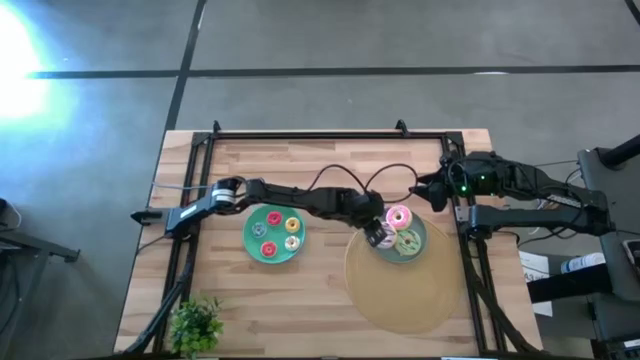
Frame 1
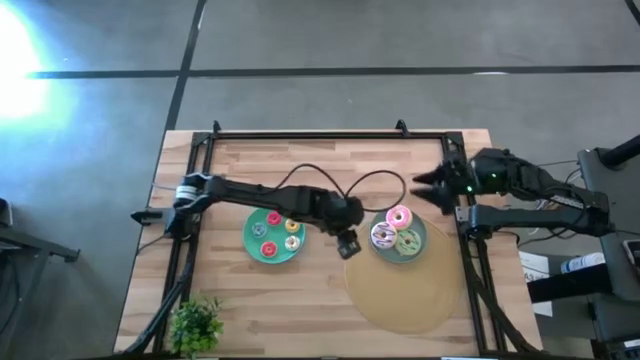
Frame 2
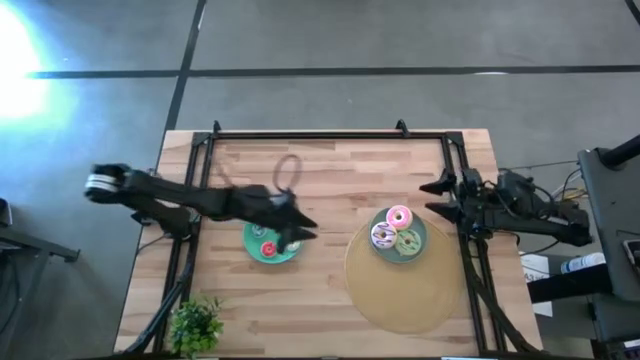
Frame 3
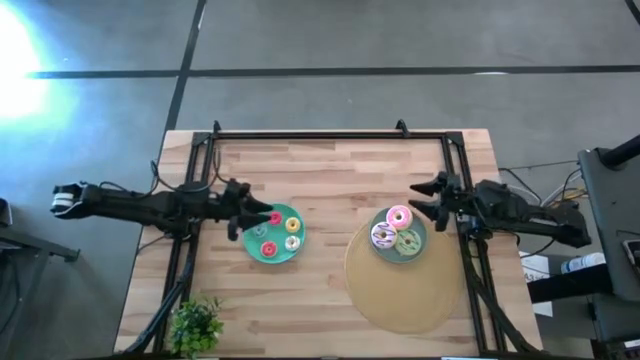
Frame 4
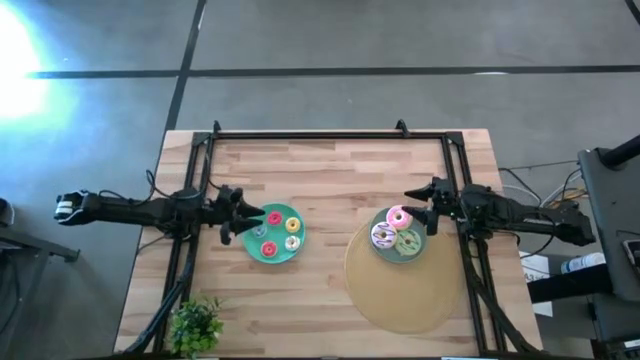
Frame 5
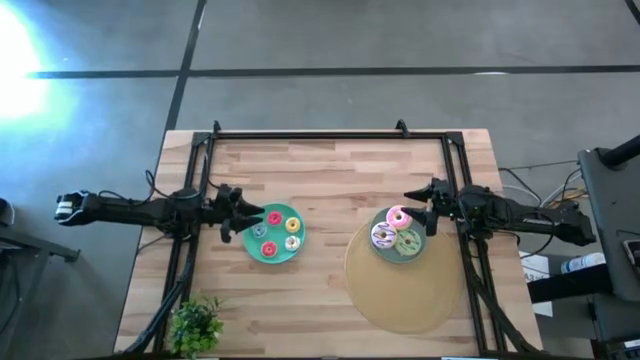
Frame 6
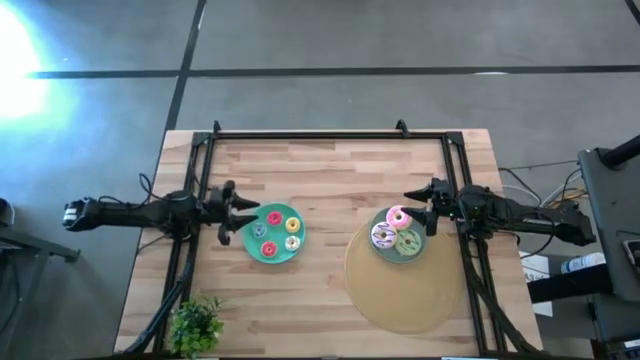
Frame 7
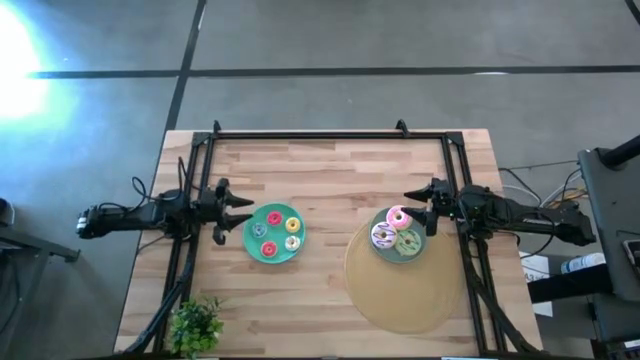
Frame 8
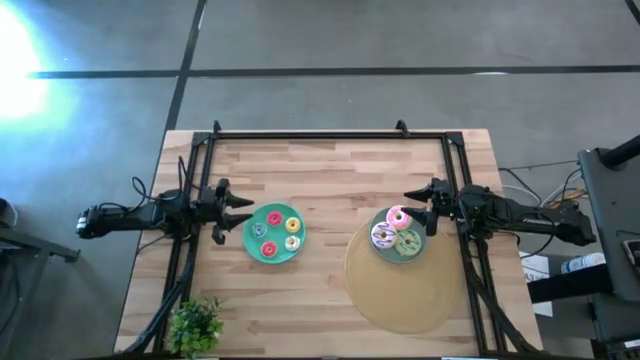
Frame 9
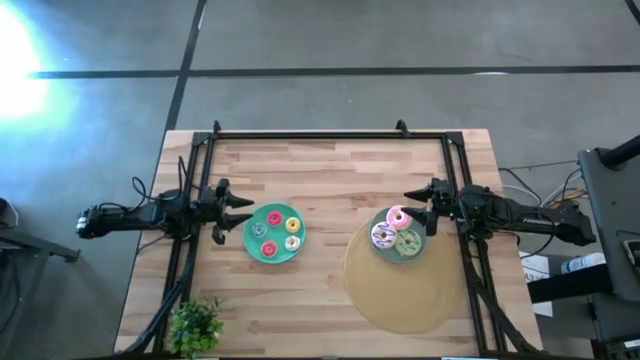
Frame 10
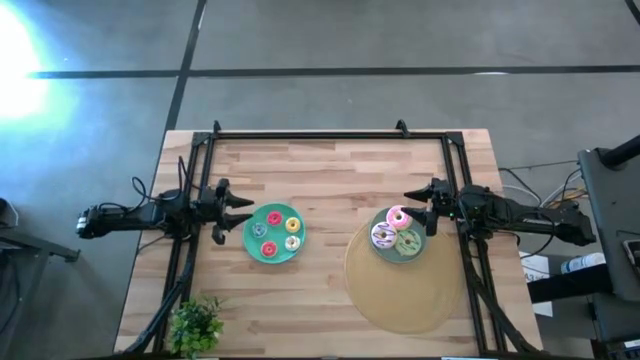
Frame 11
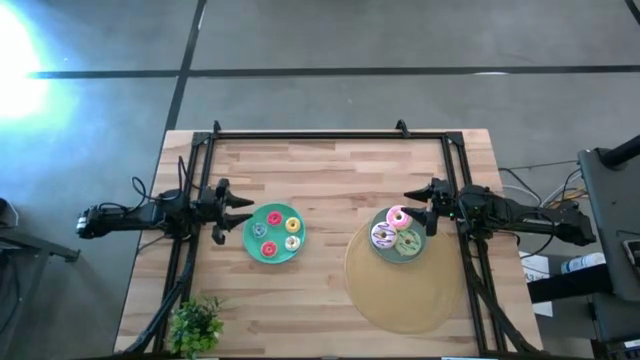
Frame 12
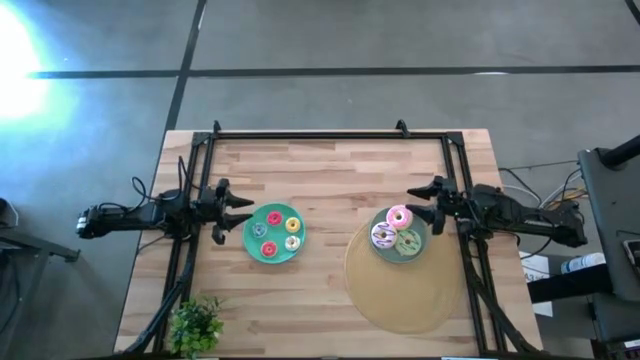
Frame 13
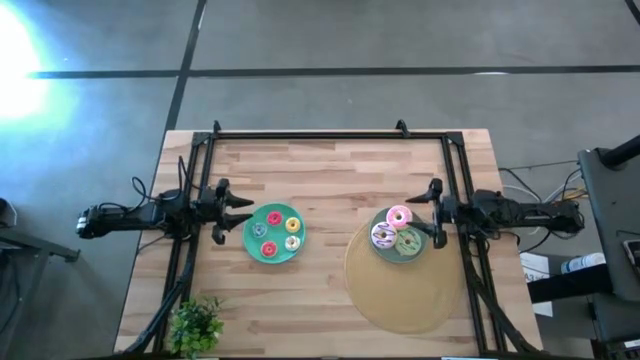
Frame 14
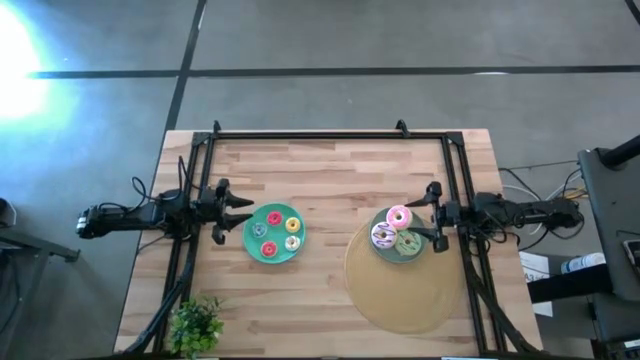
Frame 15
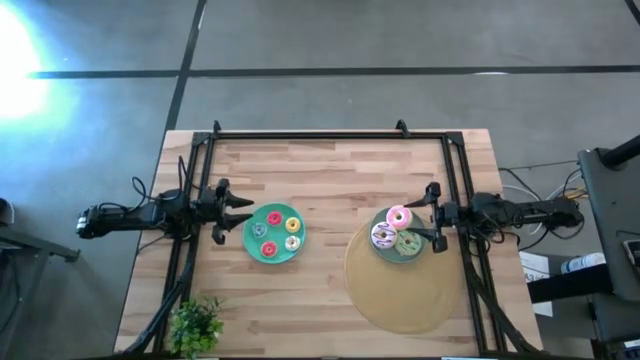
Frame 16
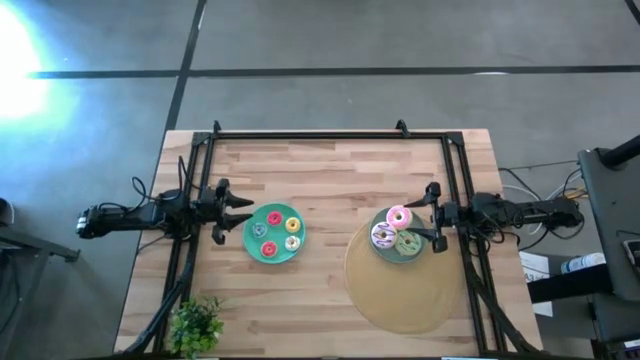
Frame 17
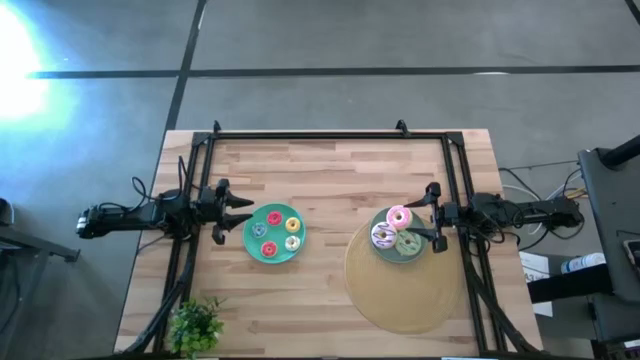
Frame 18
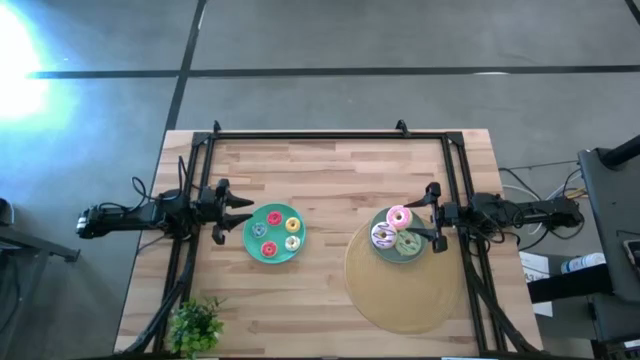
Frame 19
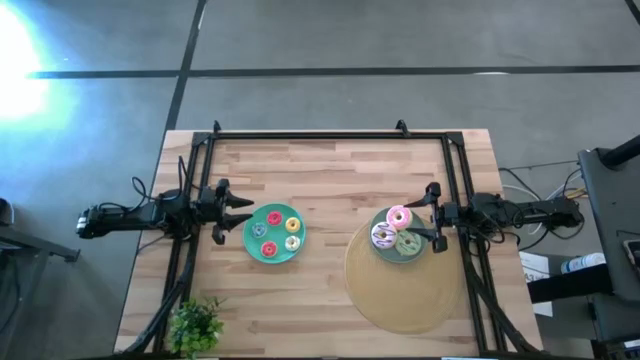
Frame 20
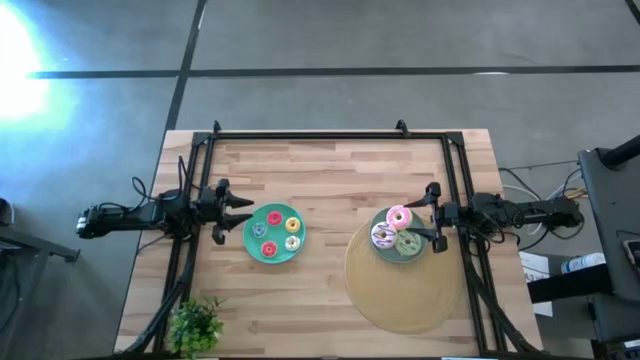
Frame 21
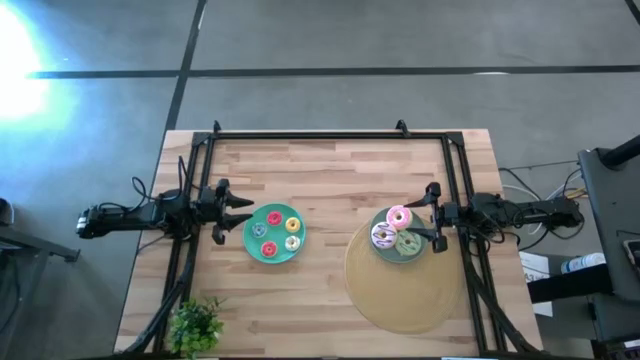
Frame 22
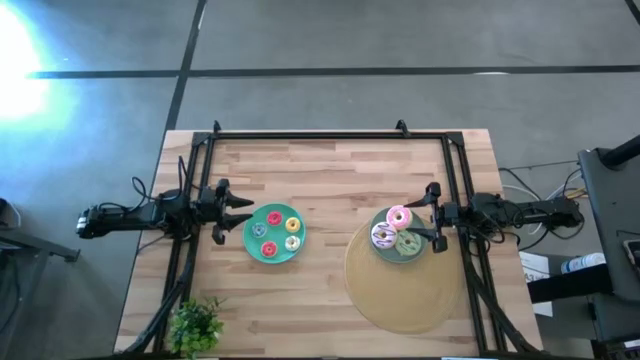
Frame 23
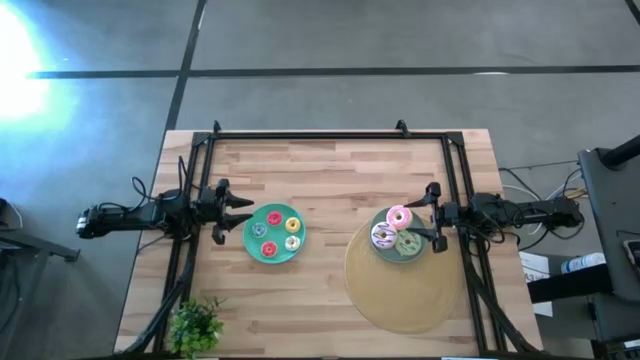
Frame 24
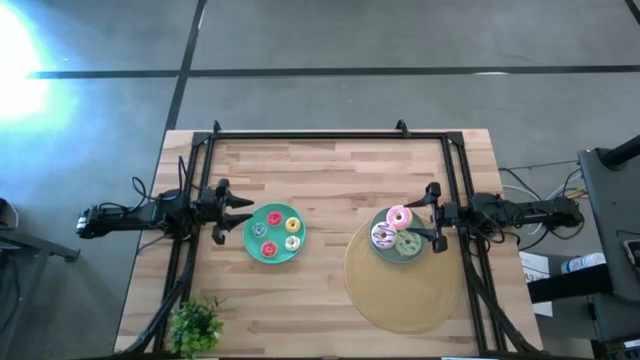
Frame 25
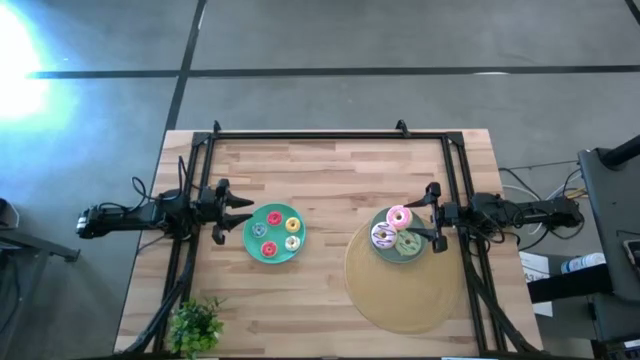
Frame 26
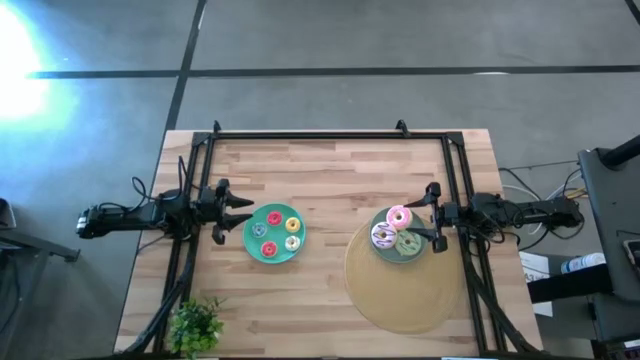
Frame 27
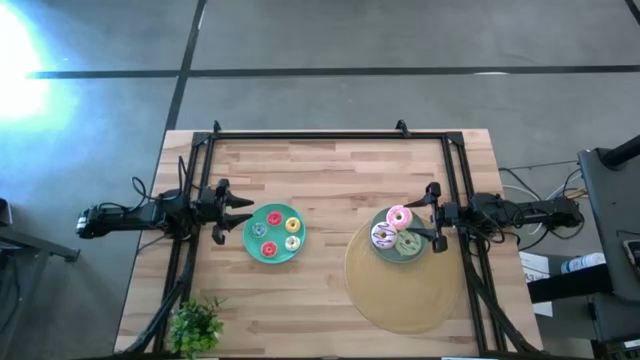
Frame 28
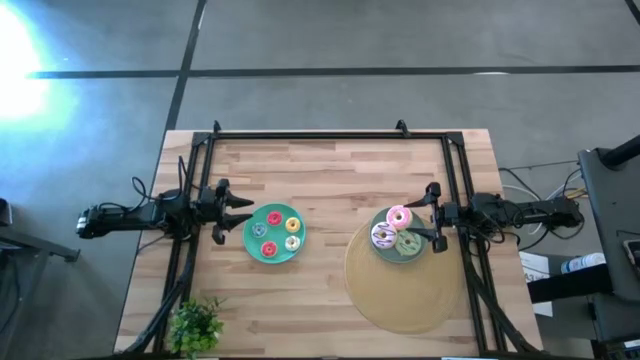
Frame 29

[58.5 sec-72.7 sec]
Task: Pick & Place donuts
Return to Home Position

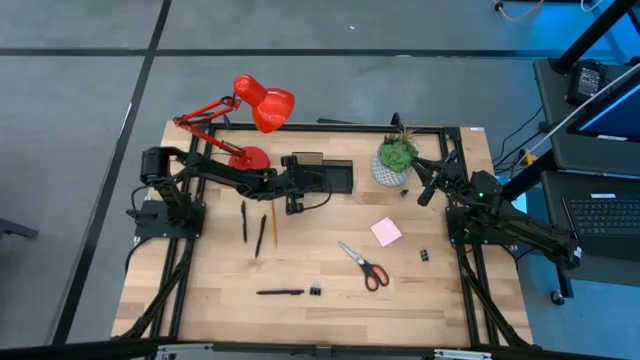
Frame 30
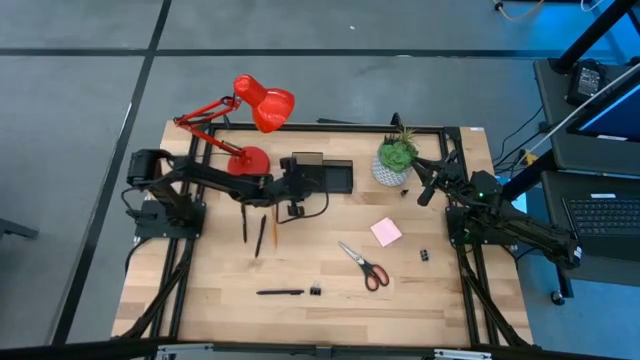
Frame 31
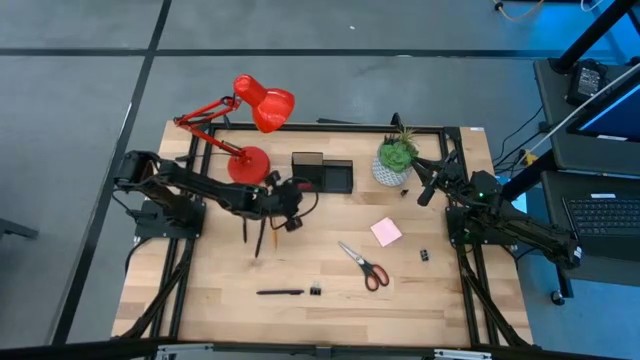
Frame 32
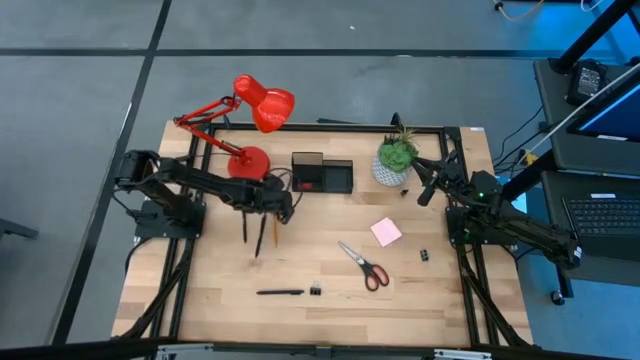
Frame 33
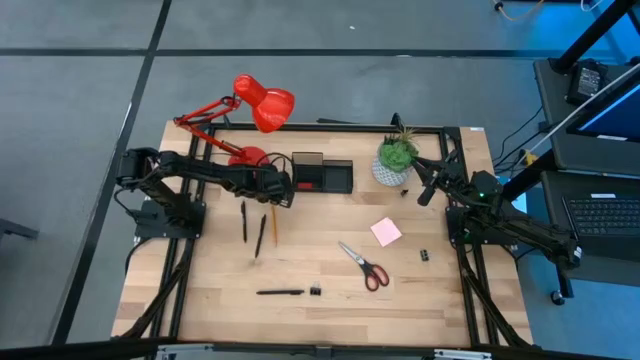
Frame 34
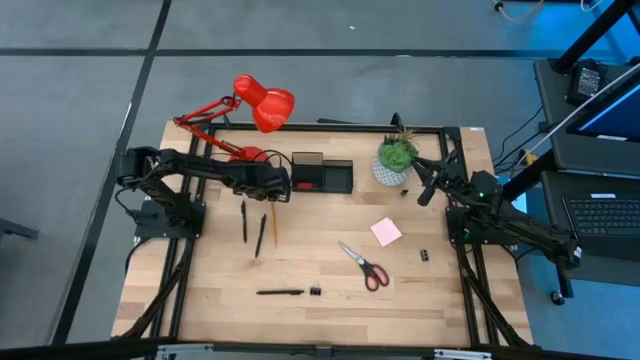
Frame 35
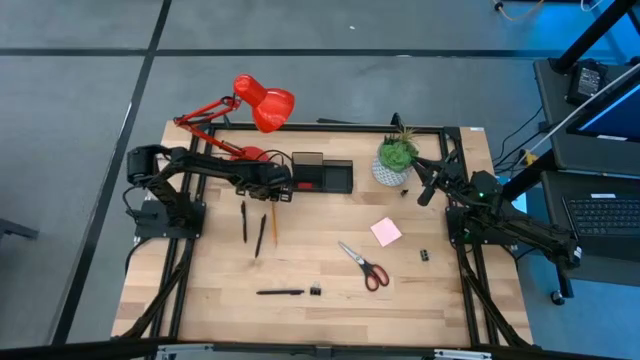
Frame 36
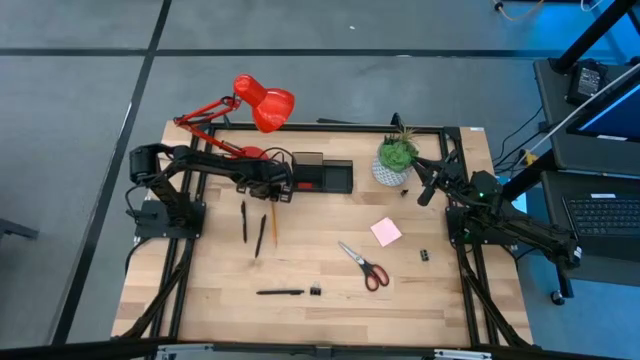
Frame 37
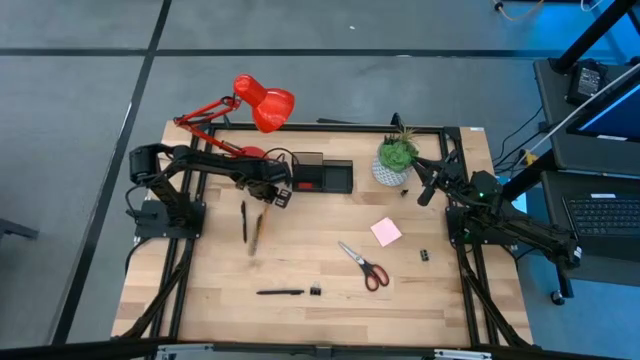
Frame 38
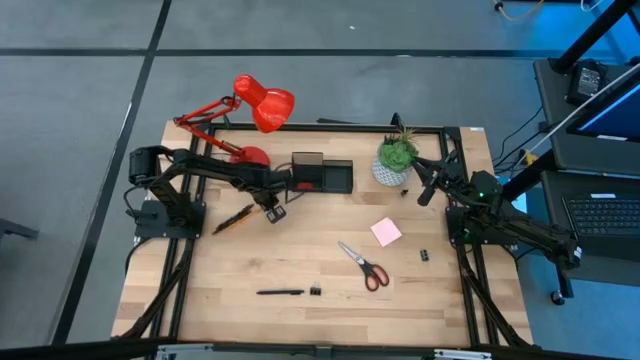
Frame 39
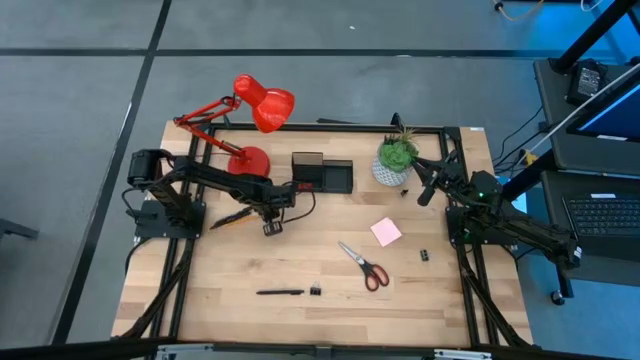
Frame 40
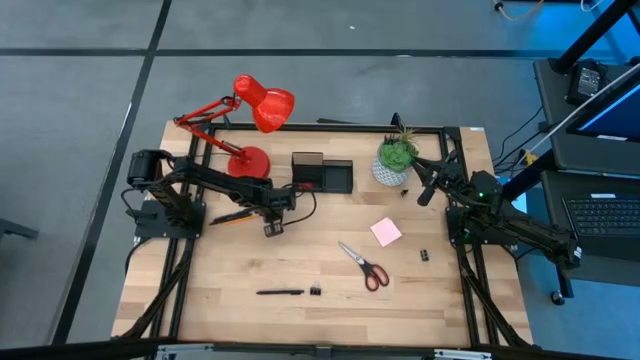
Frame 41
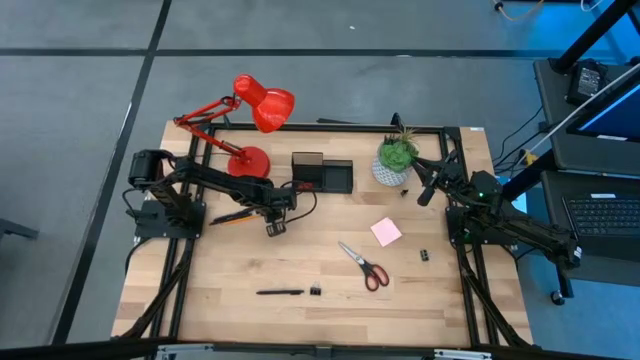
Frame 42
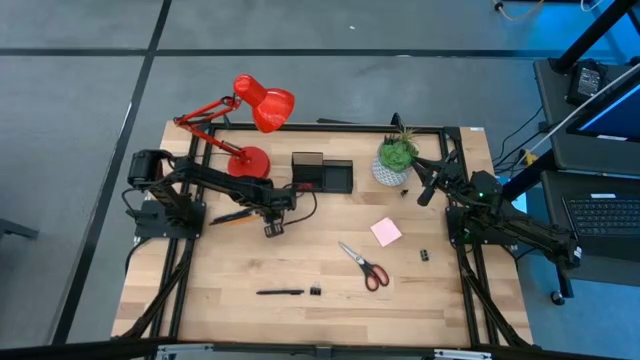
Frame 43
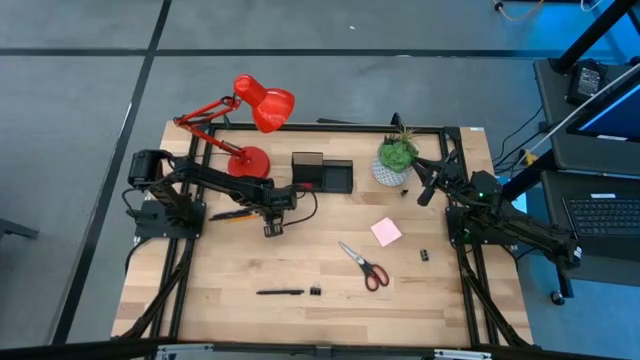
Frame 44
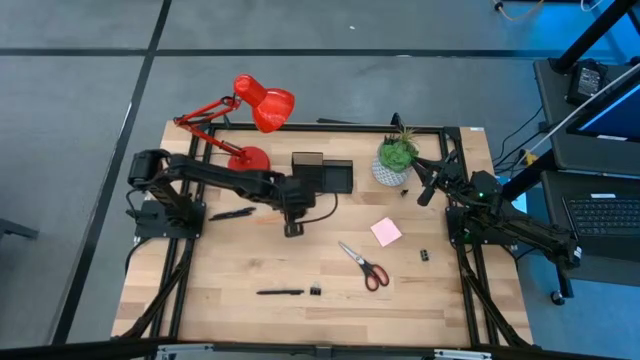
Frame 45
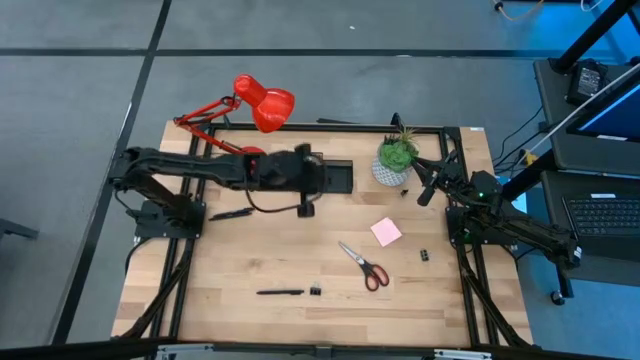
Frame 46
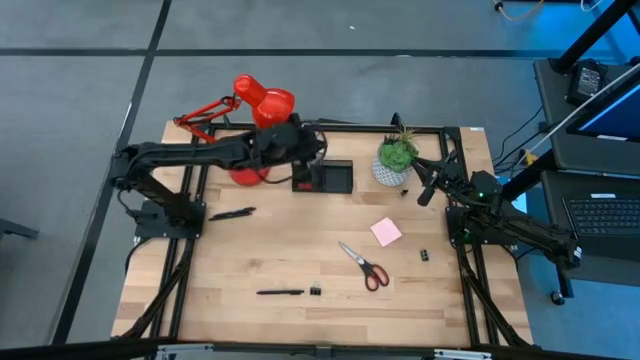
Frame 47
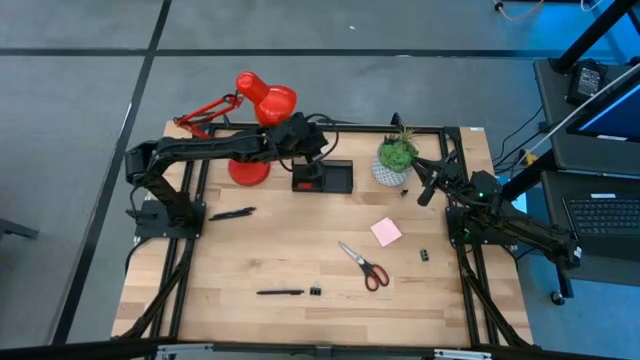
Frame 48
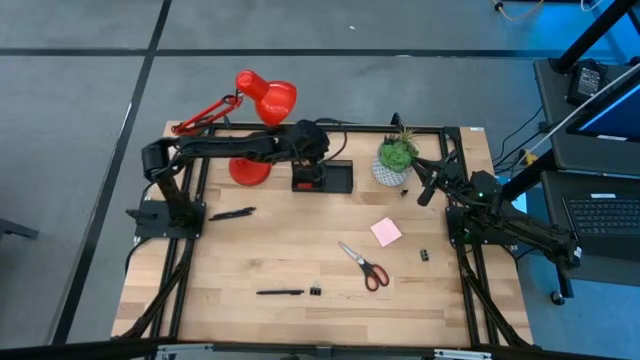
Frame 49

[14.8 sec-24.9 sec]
Task: Pick and place office supplies into organizer
Put the pencil into the desk organizer
